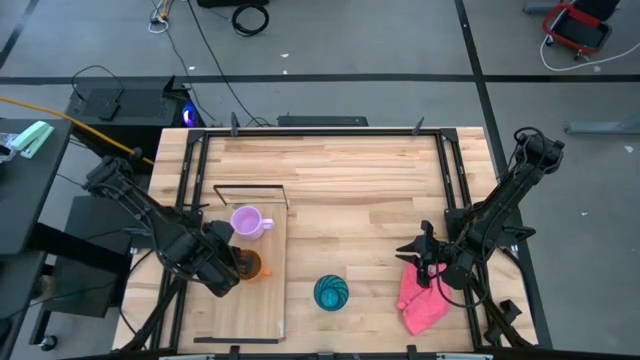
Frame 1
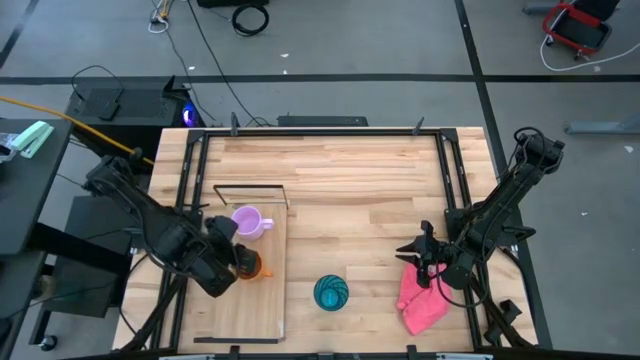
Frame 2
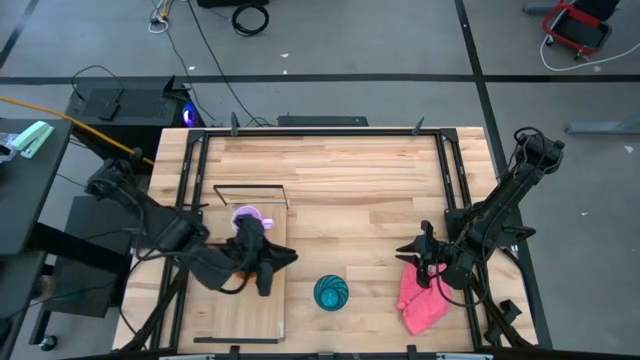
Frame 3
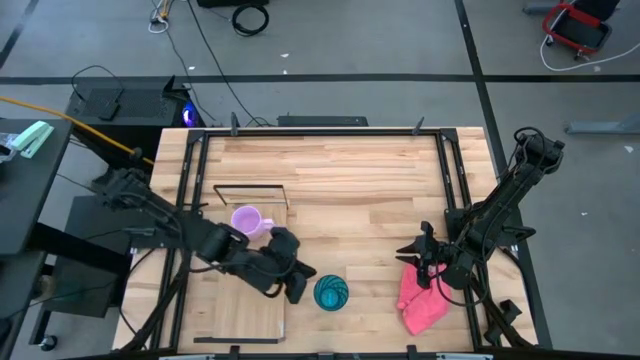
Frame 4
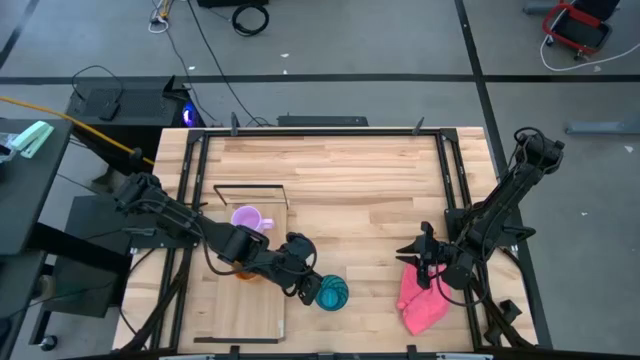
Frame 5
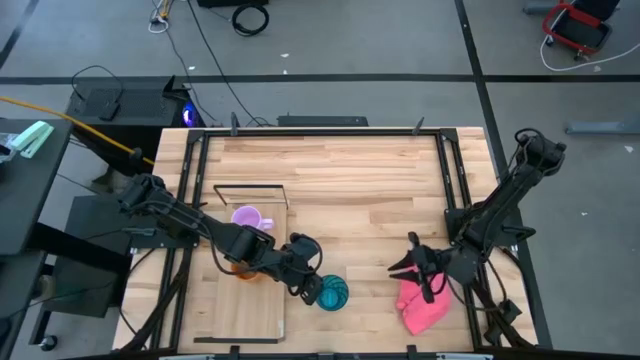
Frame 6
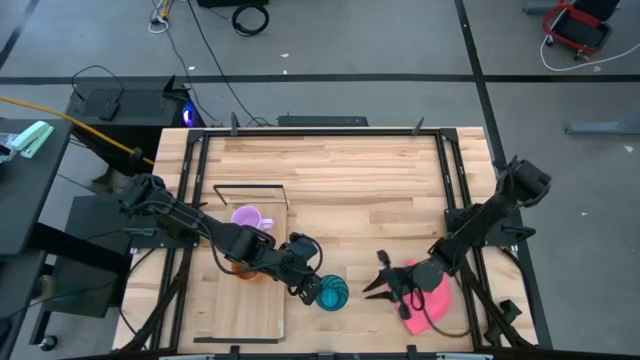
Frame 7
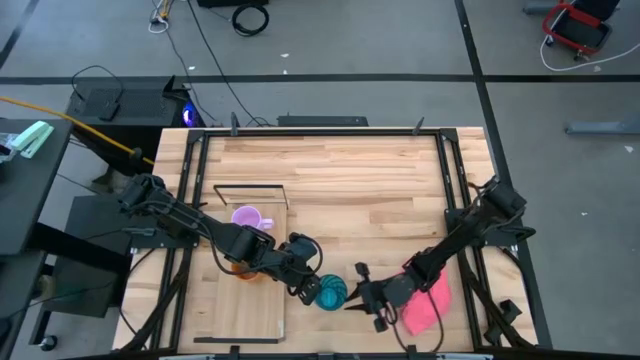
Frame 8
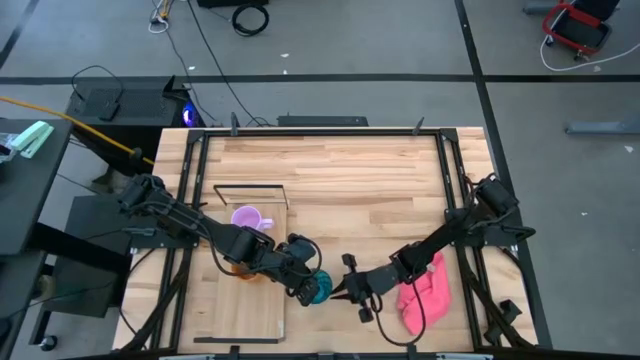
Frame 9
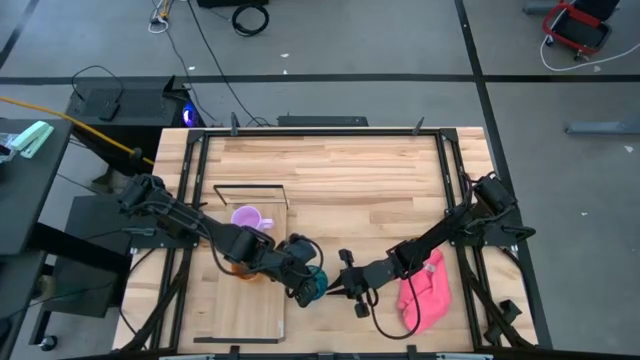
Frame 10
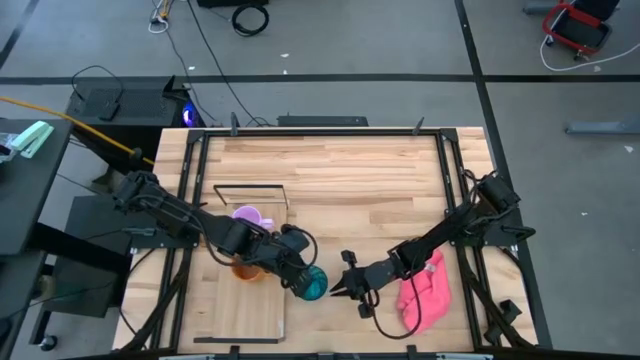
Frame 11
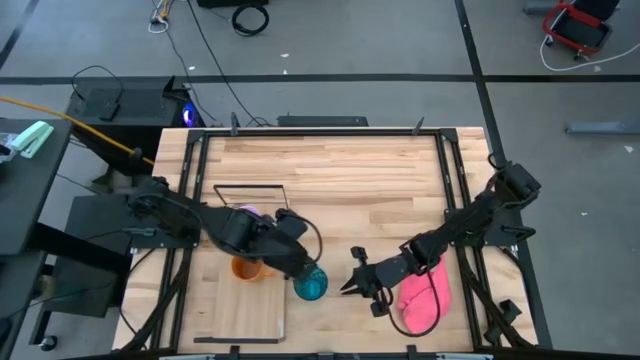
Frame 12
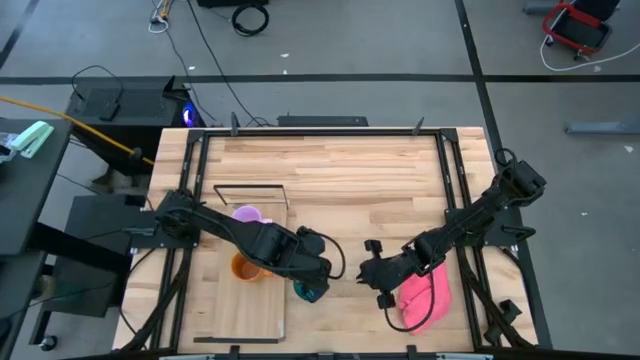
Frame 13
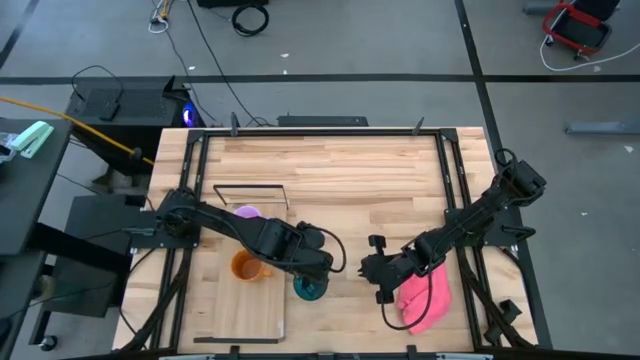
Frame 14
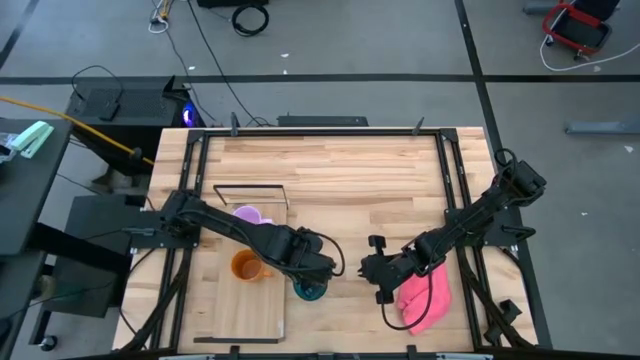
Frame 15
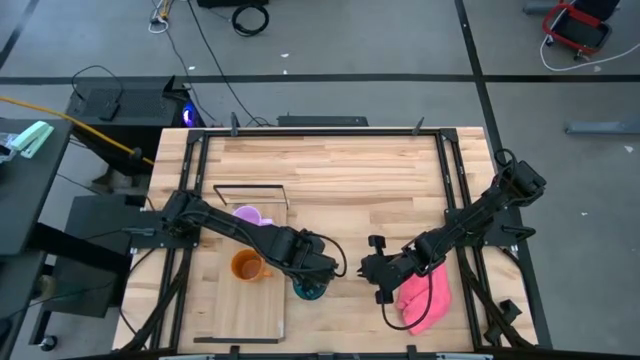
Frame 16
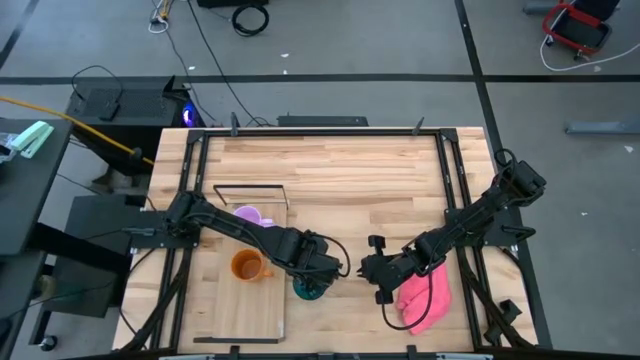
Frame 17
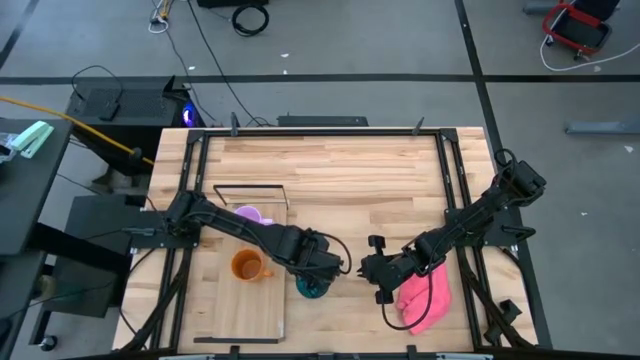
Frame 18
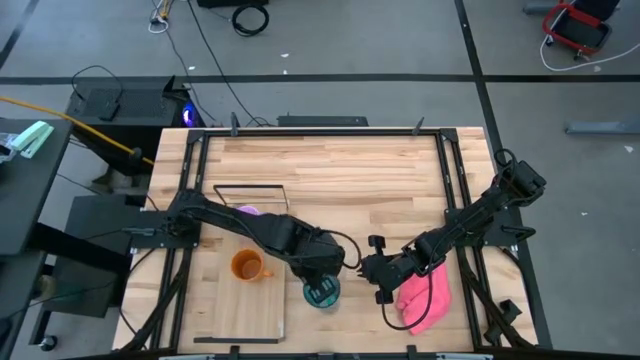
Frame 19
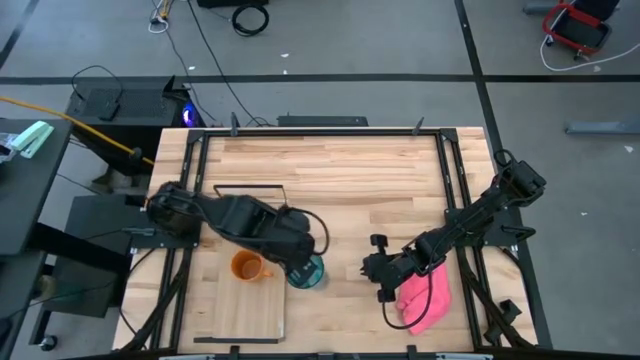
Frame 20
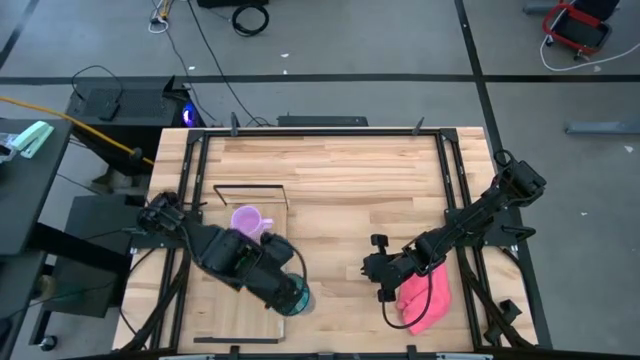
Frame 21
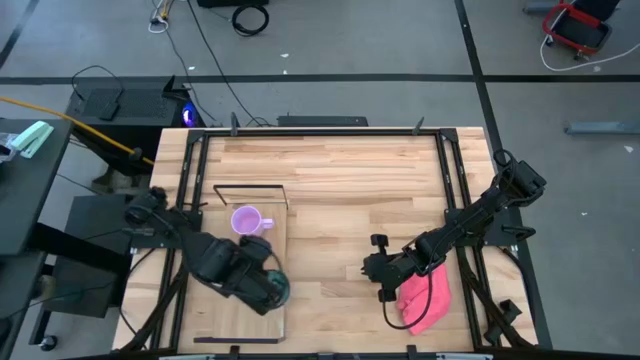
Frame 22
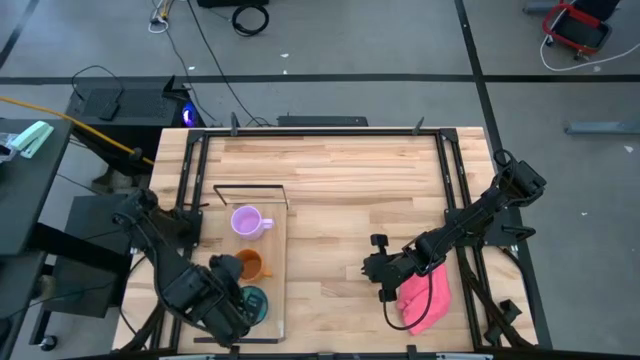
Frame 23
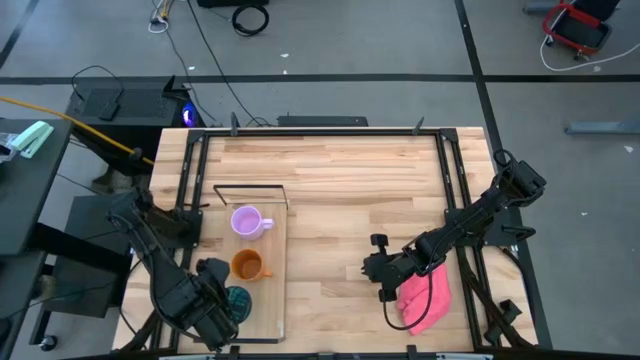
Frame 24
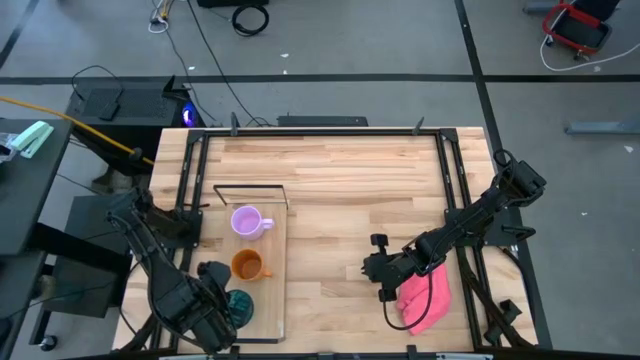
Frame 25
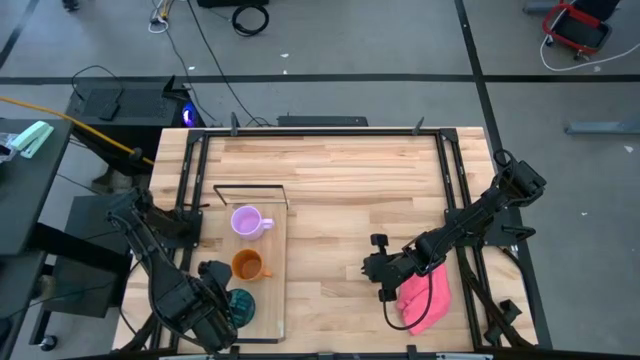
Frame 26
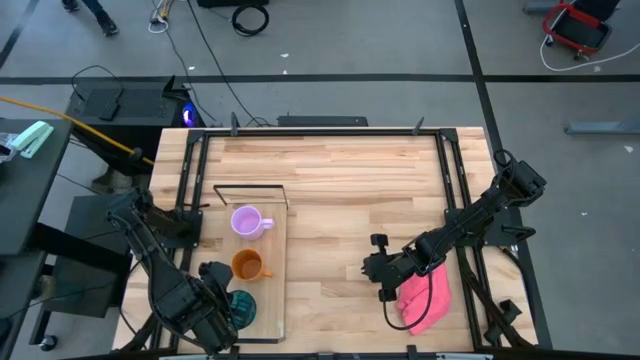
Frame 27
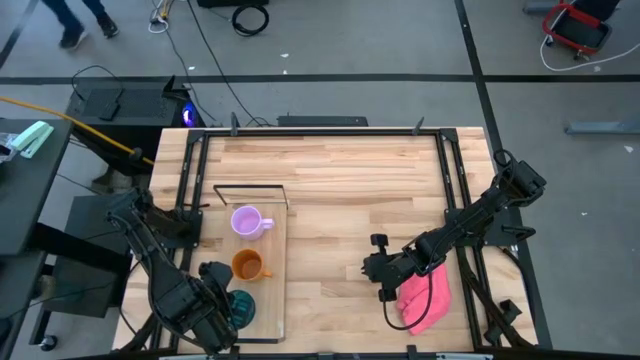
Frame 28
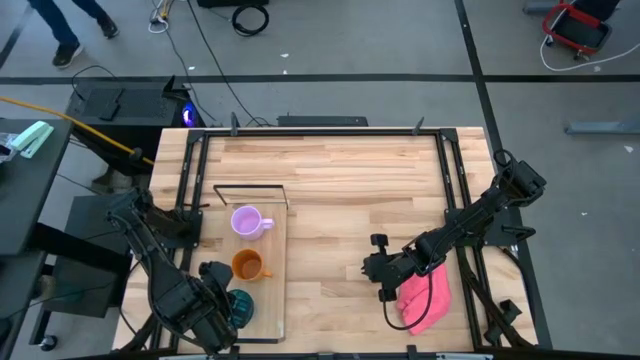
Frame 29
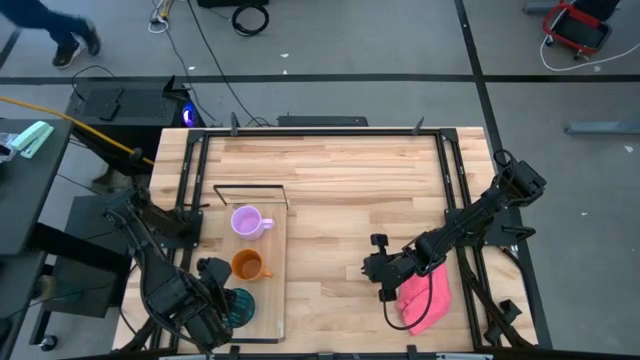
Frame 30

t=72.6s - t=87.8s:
Task: Stack small to large cups/mugs on shelf
Put the blue cup on the shelf

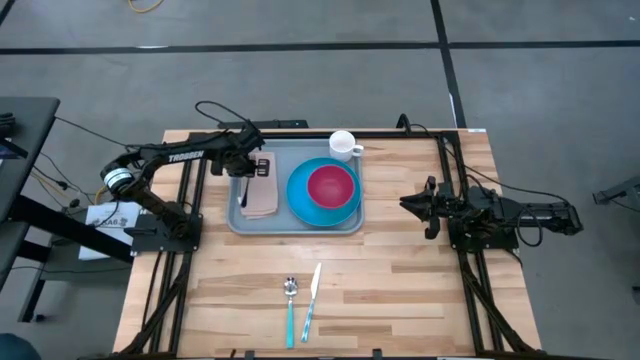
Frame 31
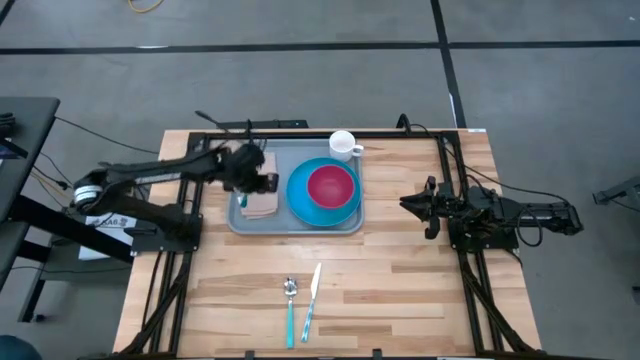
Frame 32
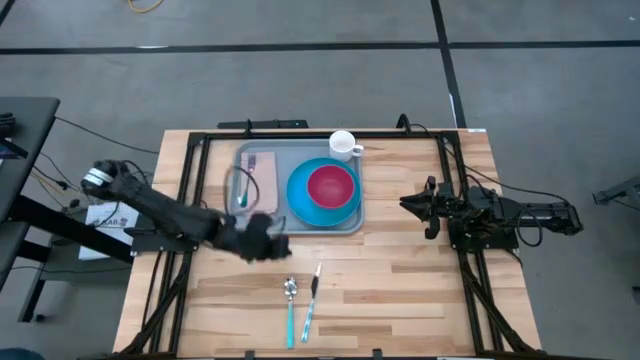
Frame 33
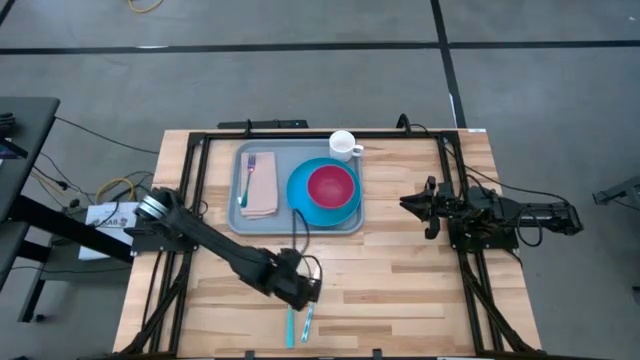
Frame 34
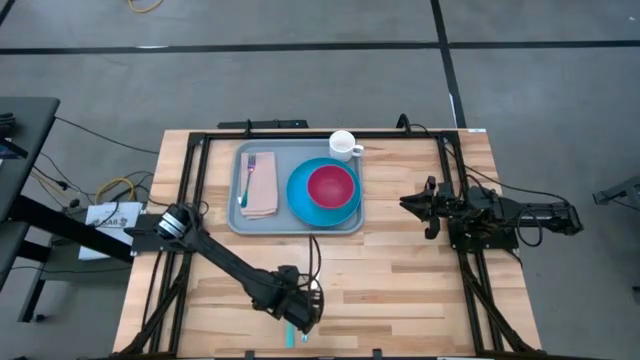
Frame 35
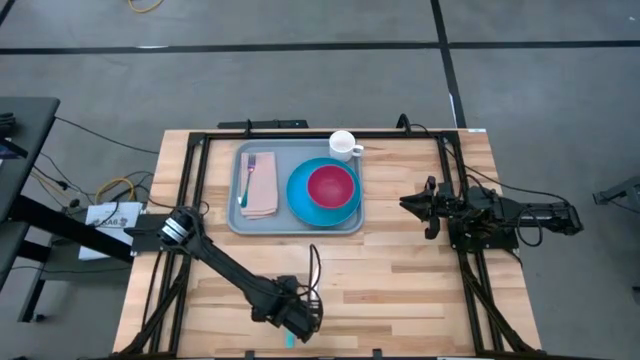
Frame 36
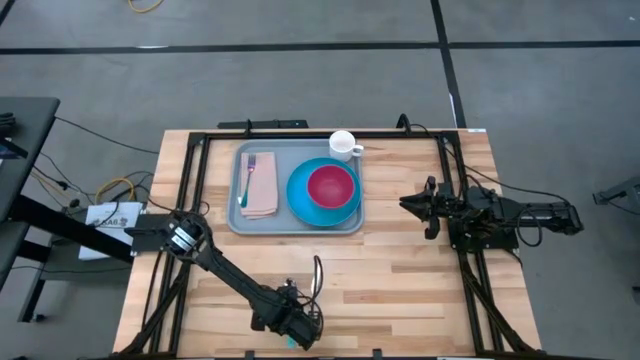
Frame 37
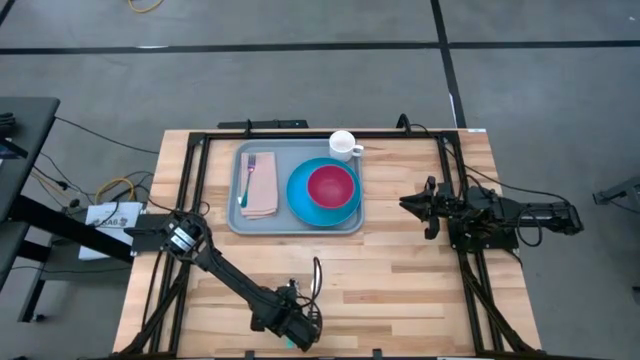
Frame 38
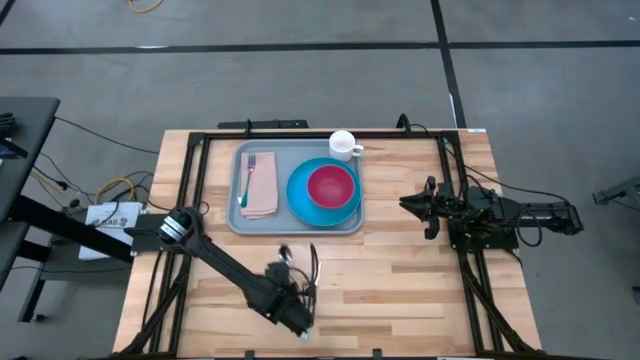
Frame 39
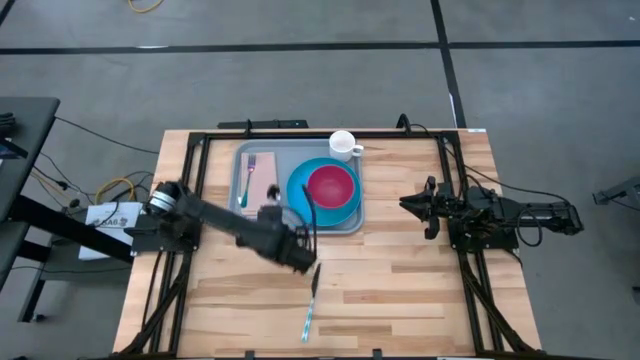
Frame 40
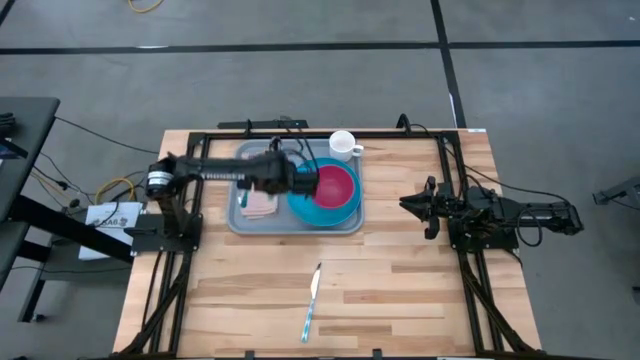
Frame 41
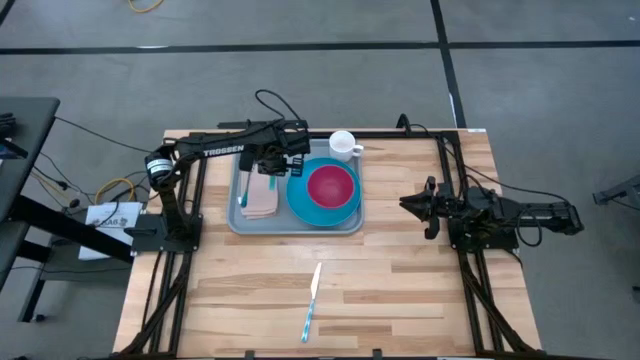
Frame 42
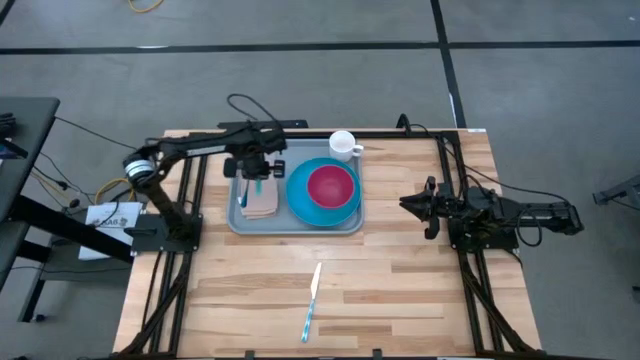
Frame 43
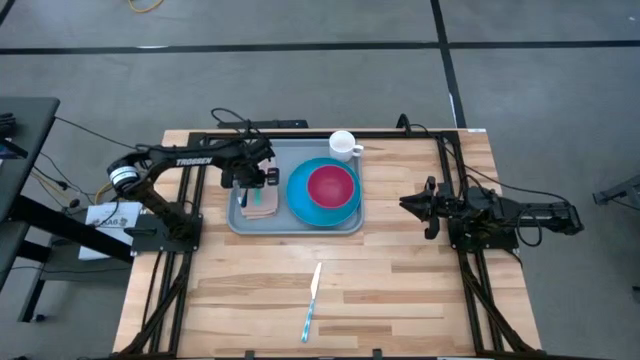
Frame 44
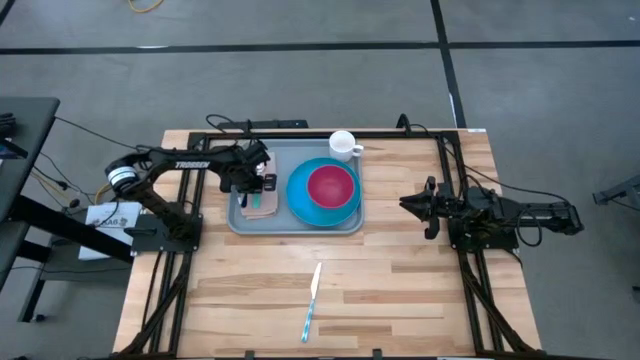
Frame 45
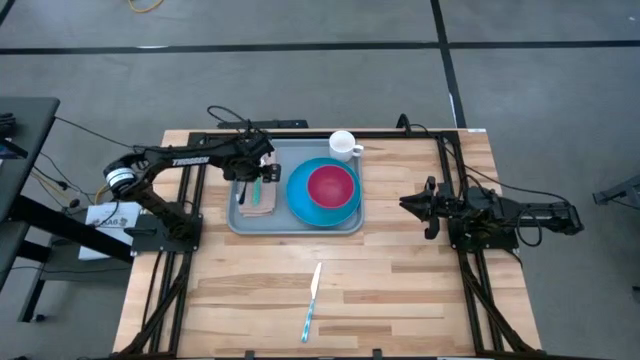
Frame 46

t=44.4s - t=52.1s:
Task: Set up tray
Put the light blue spoon on the brown napkin to the right of the blue fork
